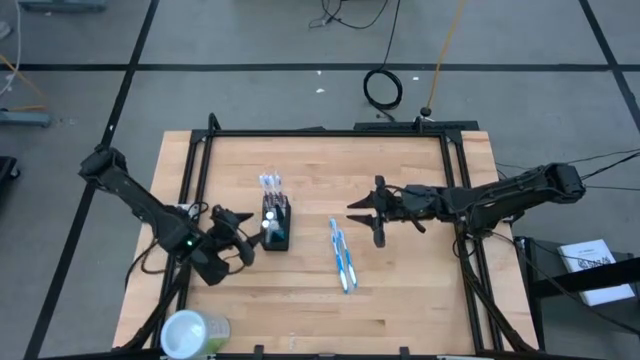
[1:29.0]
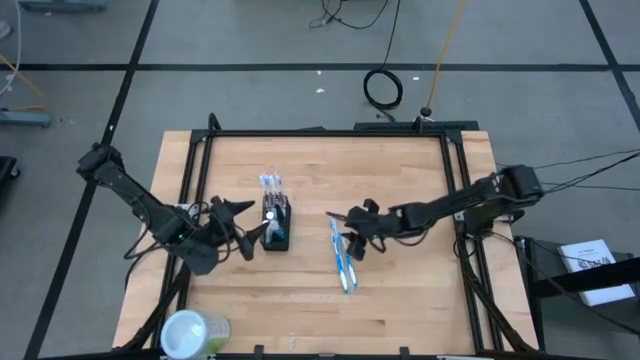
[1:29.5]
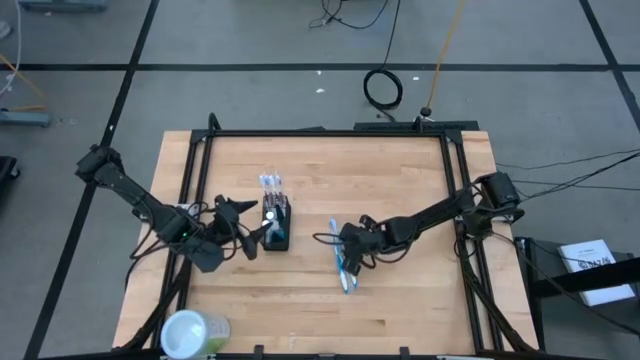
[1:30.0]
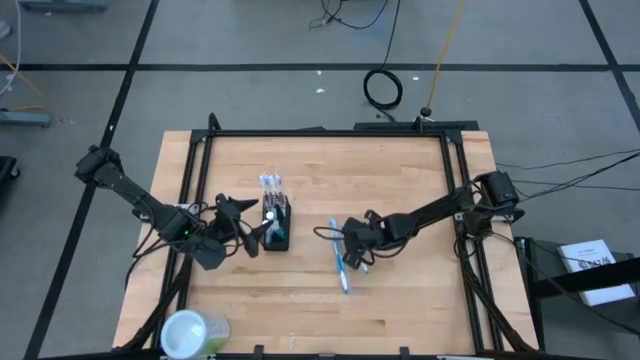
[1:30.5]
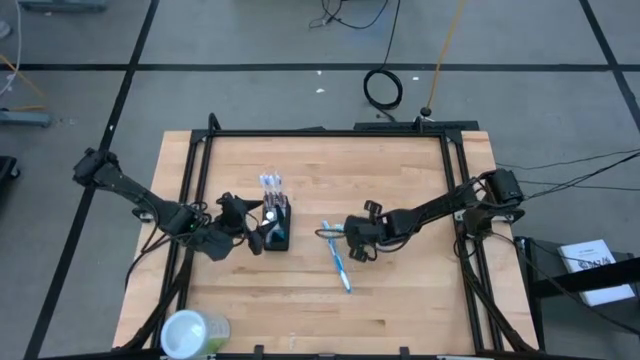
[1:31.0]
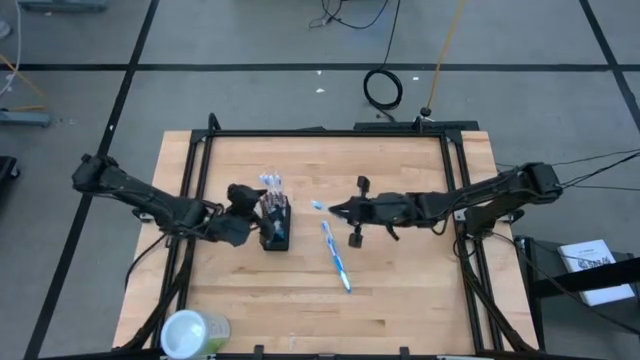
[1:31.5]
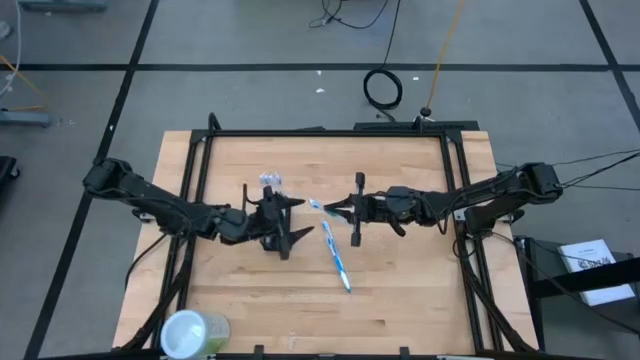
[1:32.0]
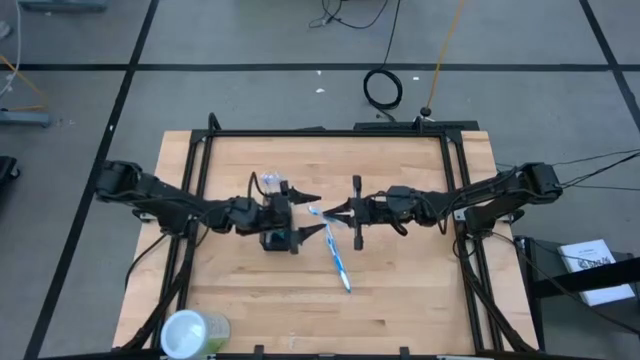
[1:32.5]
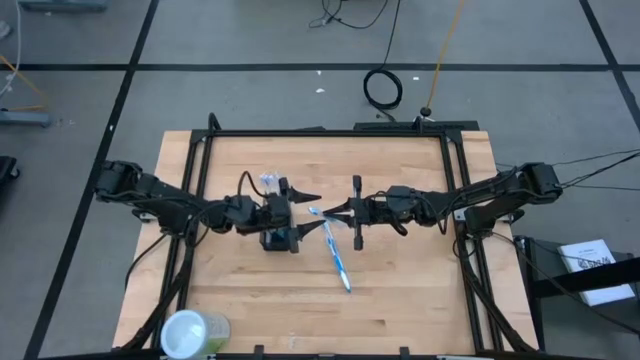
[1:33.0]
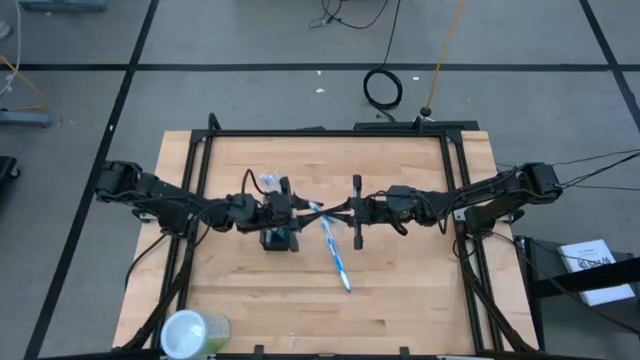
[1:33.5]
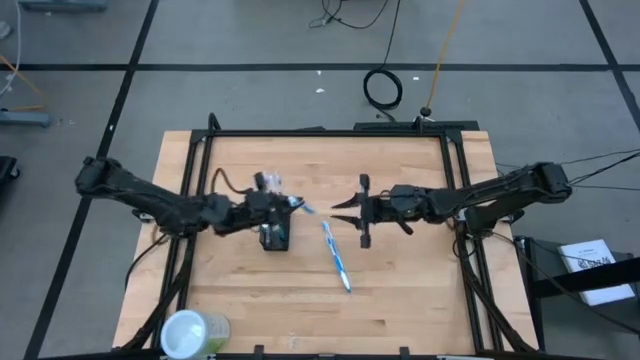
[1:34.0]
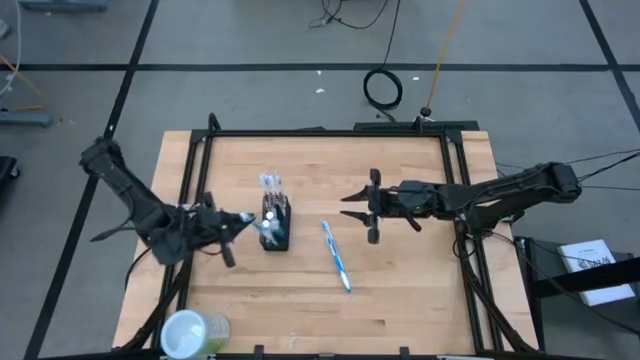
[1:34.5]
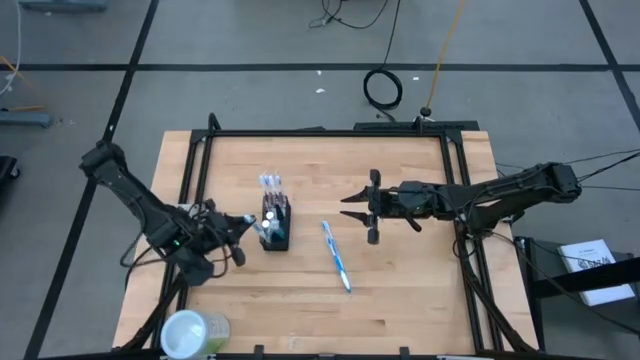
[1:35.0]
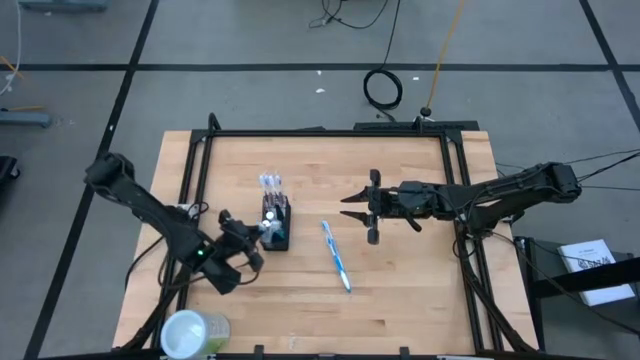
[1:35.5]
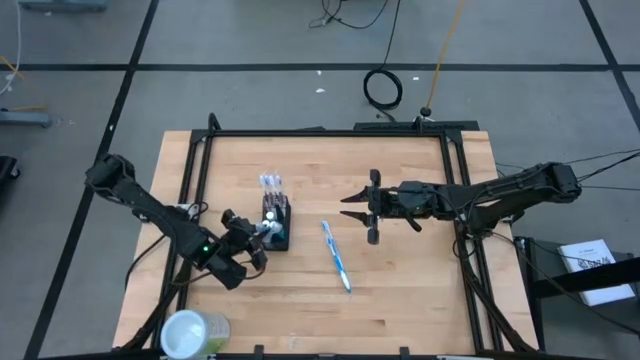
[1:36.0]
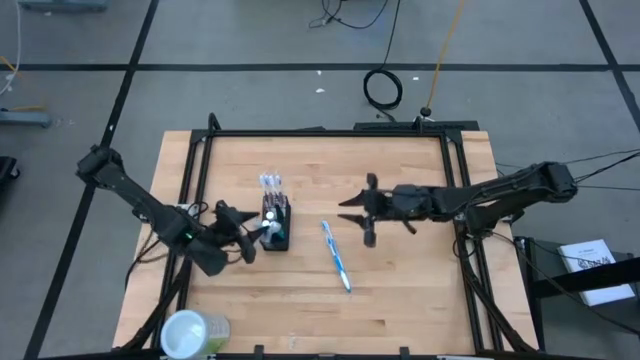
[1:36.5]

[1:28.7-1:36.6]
Task: Pick & Place toothbrushing station
Put the blue toothbrush into the bottom compartment of the mesh organizer

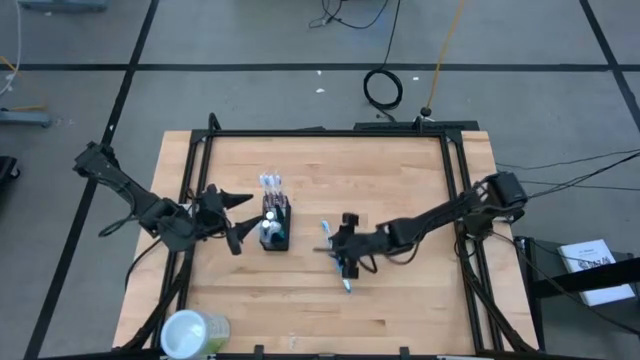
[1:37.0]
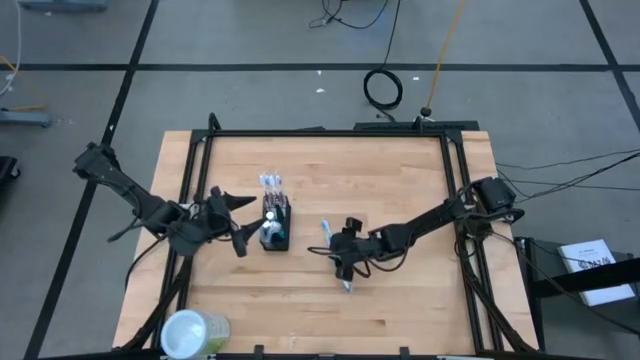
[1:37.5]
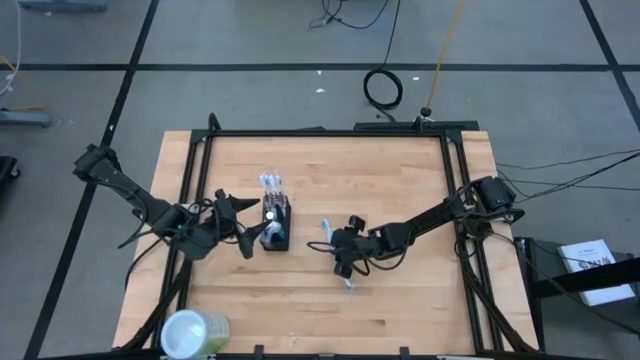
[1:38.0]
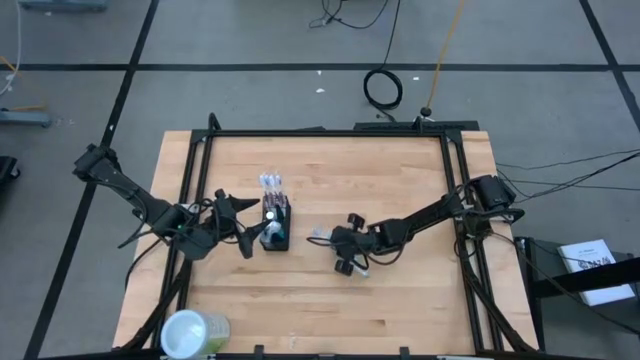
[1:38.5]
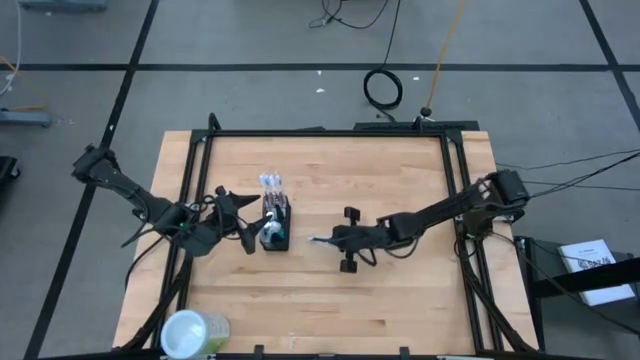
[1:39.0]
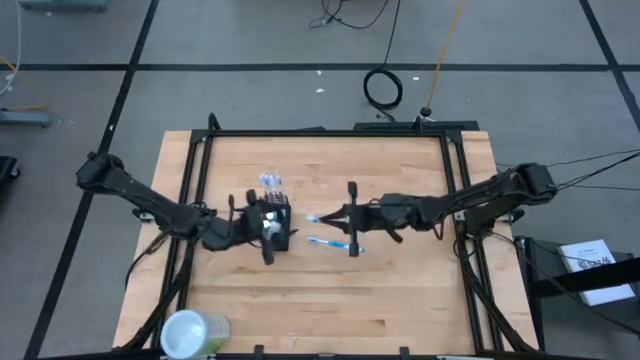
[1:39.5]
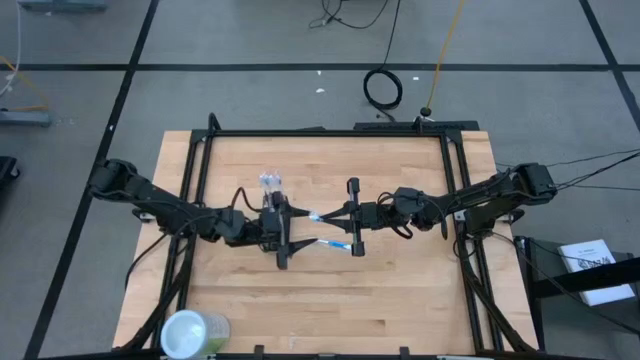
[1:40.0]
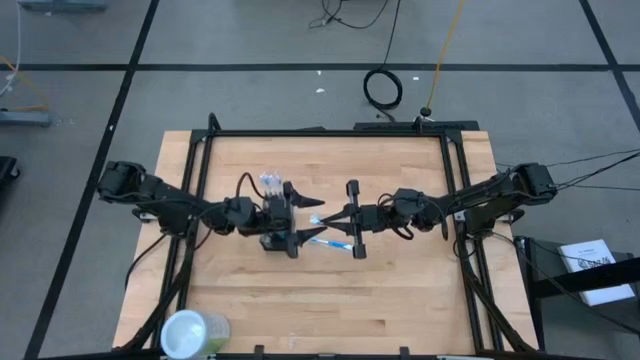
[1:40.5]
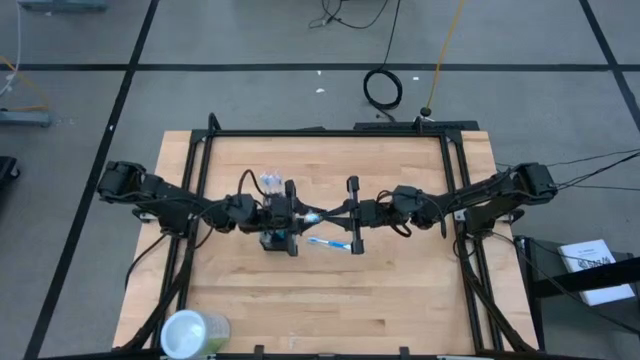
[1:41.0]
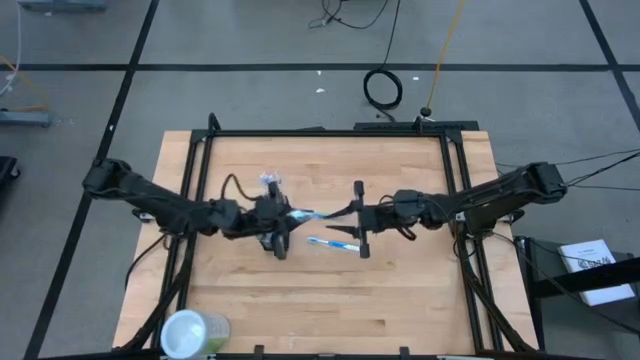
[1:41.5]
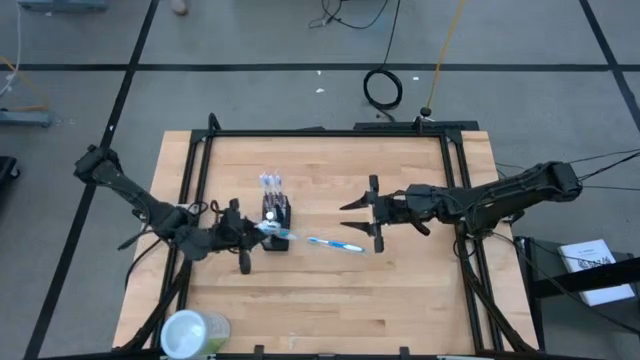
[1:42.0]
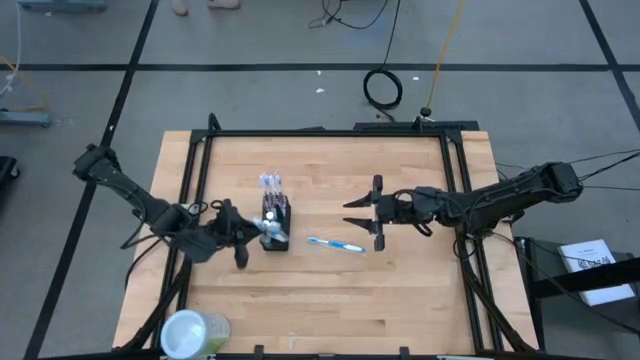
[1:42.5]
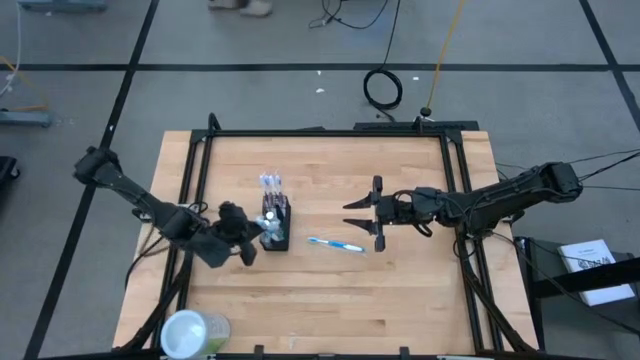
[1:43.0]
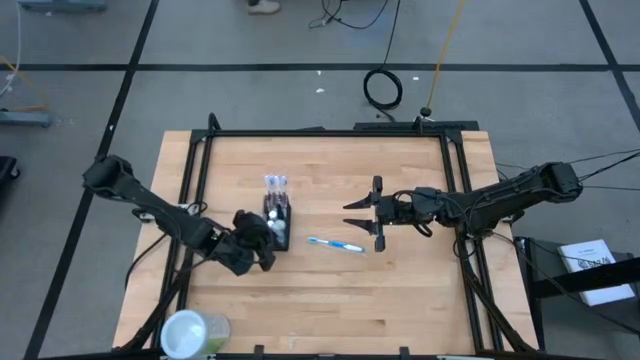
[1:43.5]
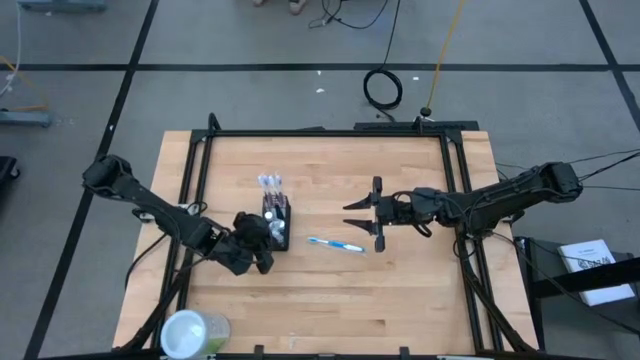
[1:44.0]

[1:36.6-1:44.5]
Put the left blue toothbrush into the bottom compartment of the mesh organizer

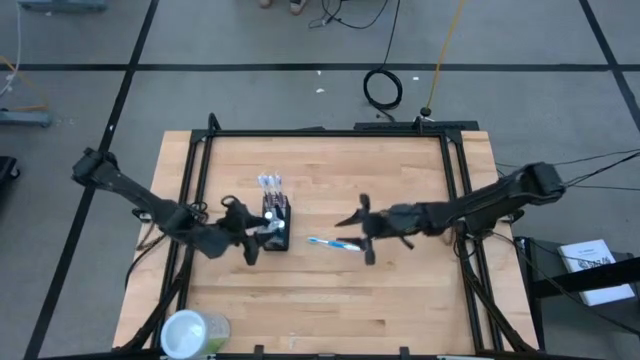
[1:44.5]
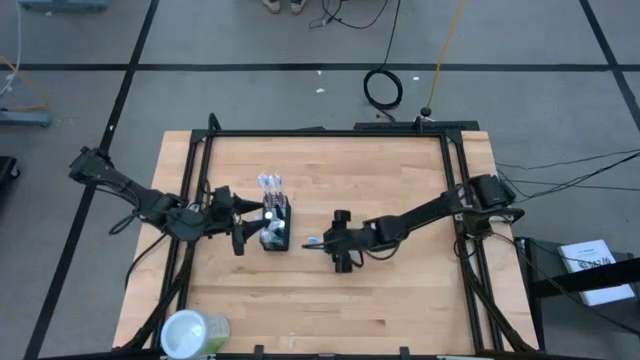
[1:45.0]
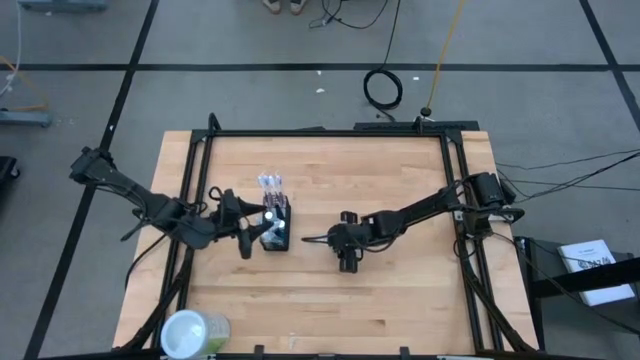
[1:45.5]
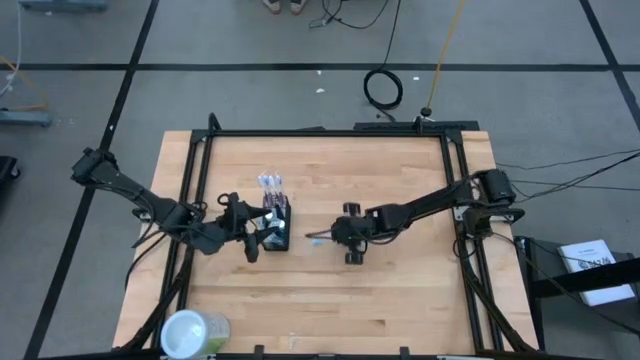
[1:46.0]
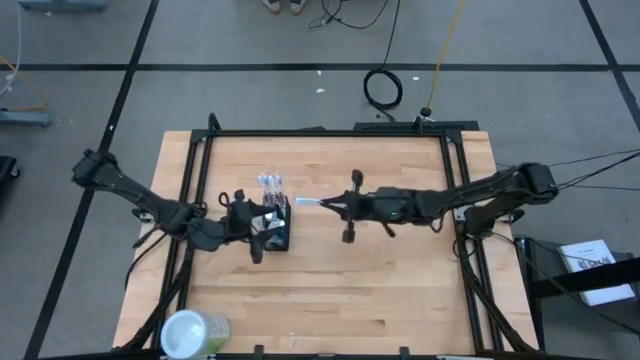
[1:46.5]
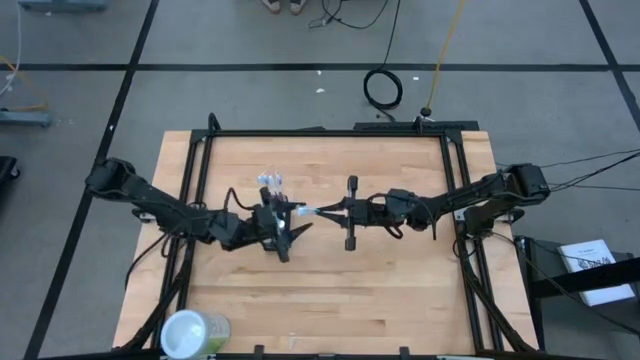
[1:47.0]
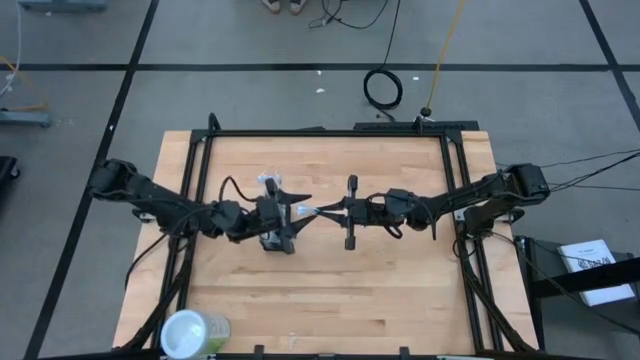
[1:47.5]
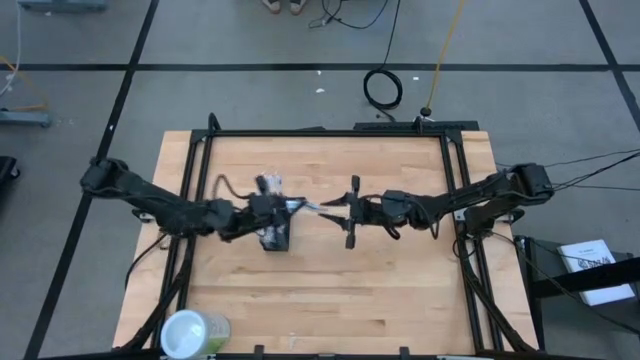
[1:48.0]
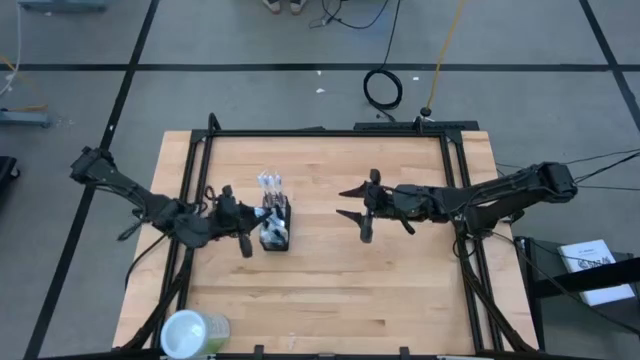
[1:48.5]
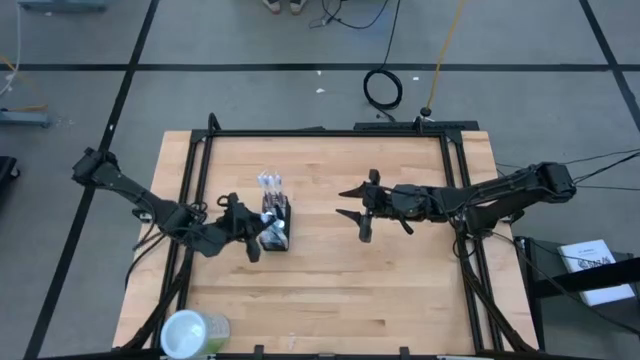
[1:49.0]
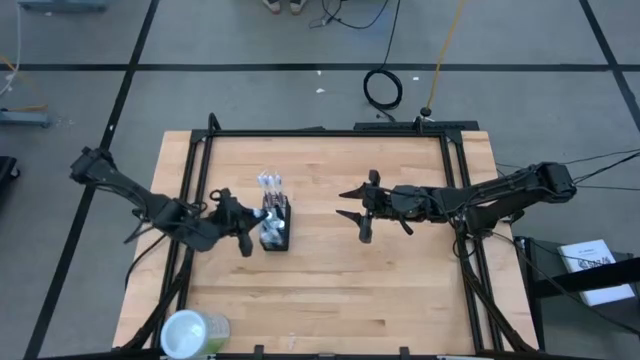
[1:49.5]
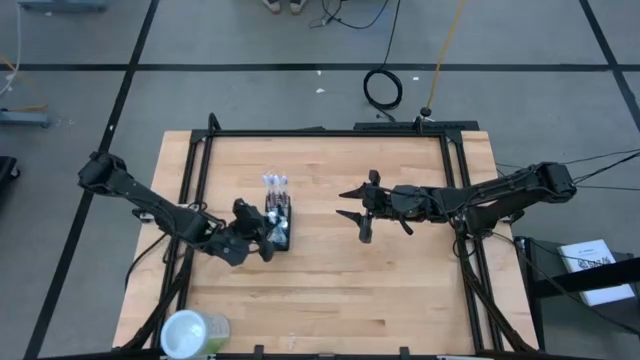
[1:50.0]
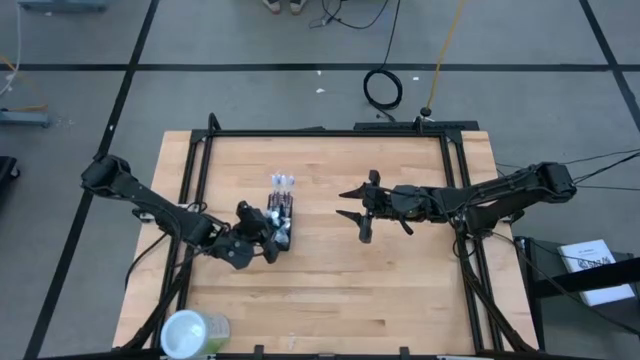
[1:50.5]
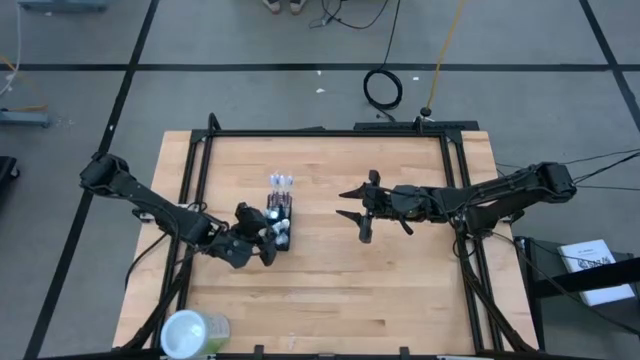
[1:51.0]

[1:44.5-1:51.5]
Put the blue toothbrush into the bottom compartment of the mesh organizer
